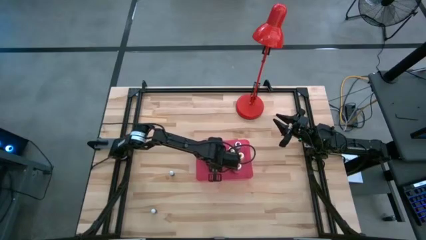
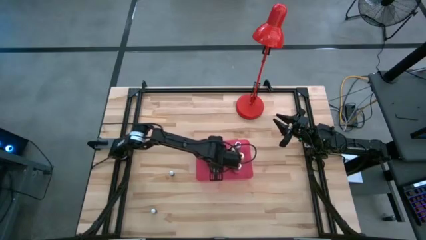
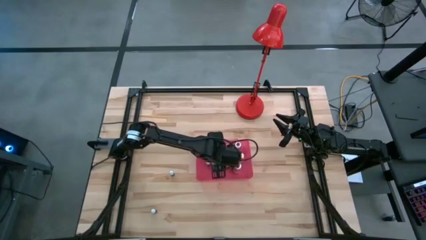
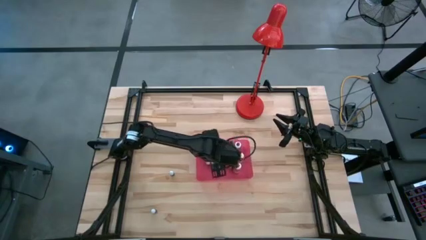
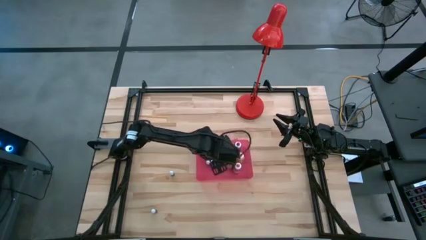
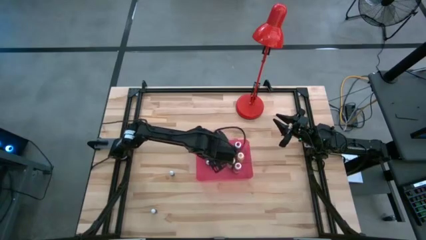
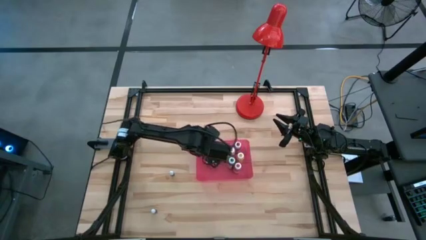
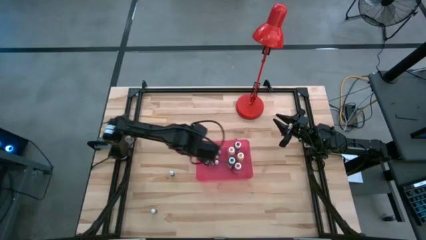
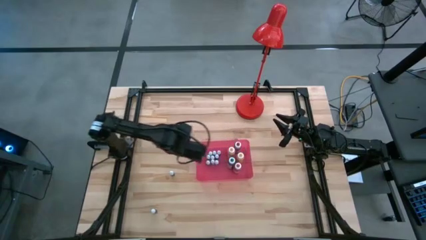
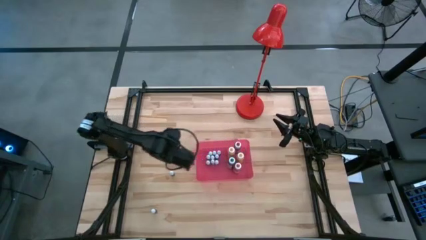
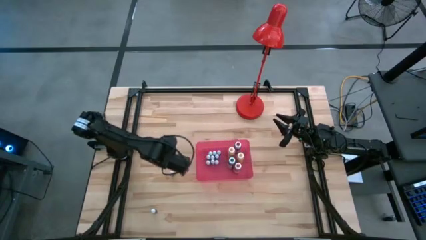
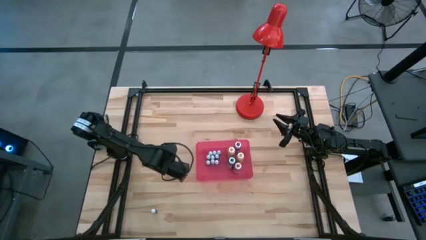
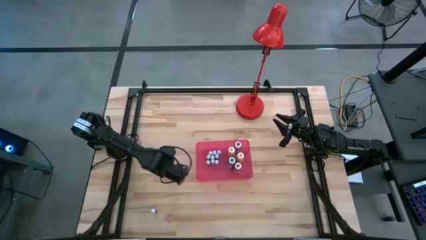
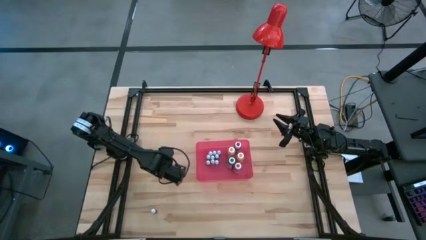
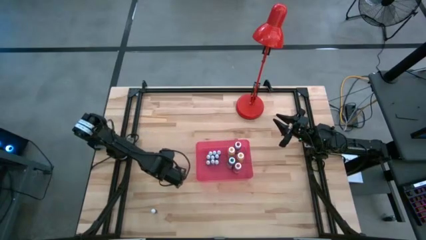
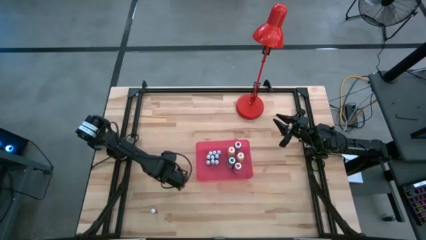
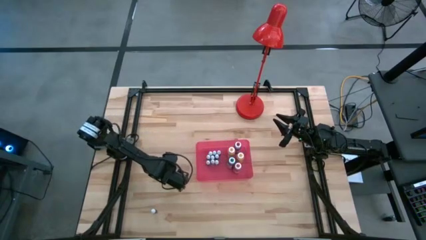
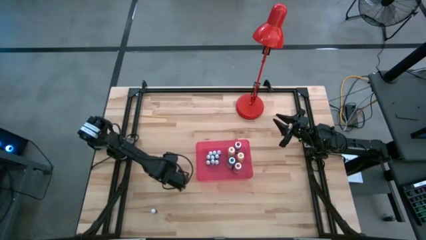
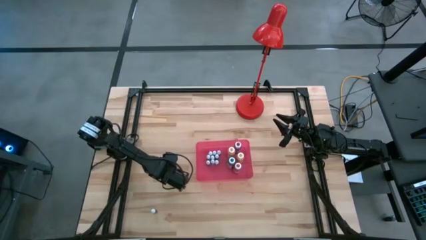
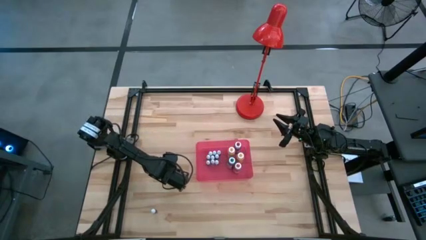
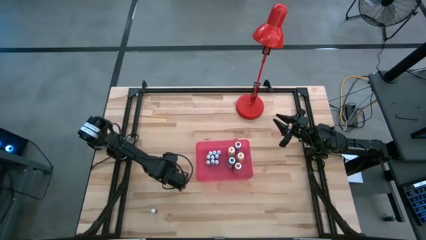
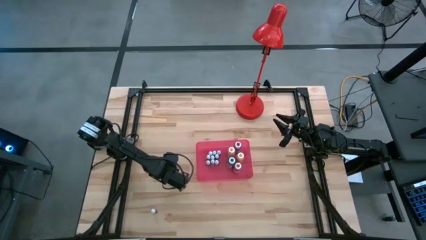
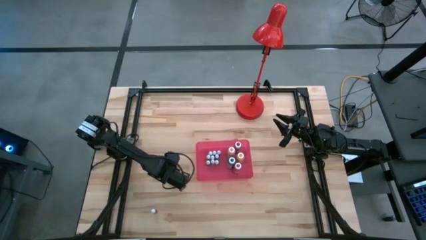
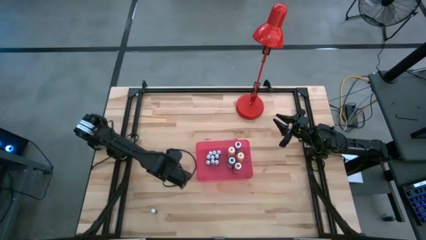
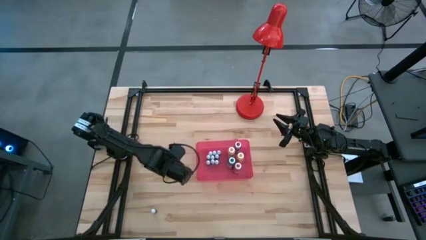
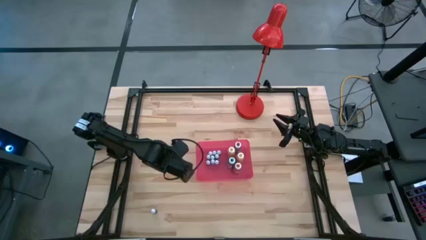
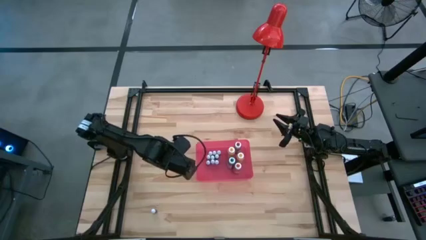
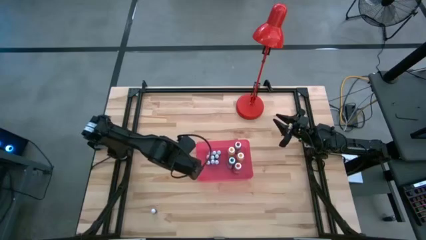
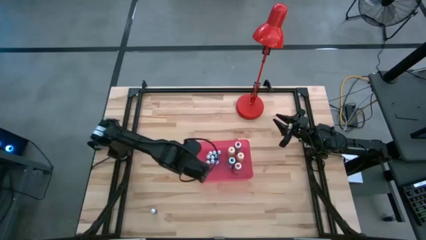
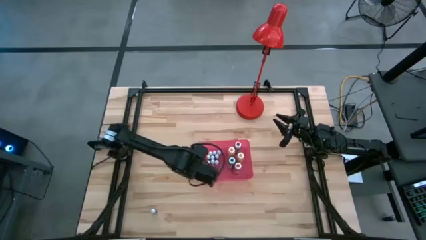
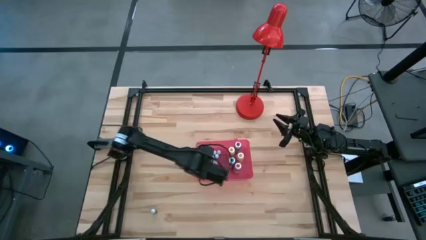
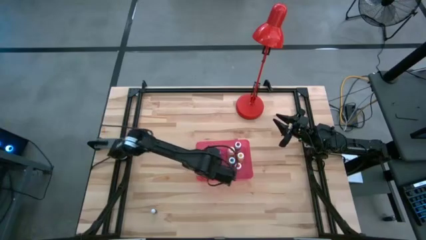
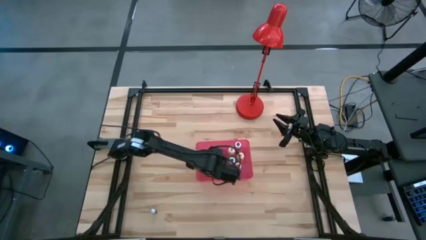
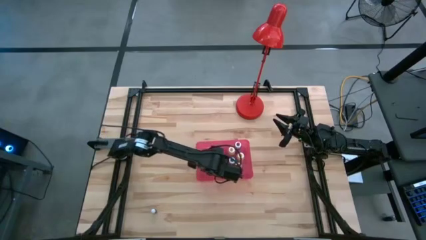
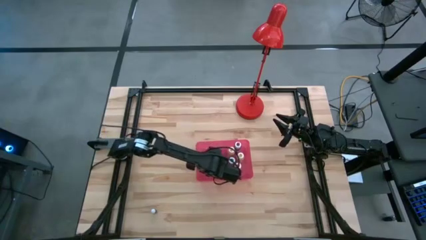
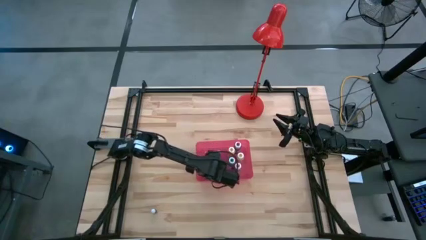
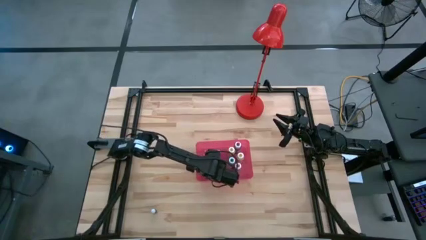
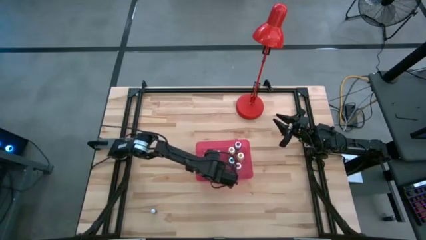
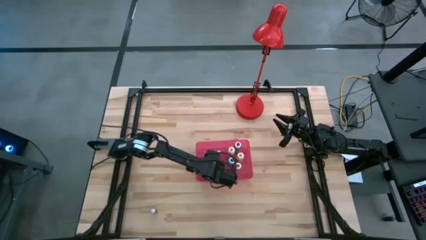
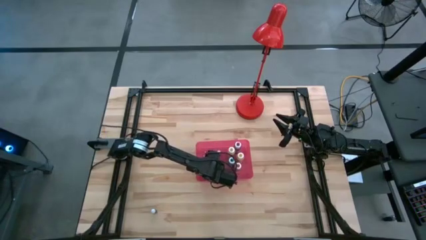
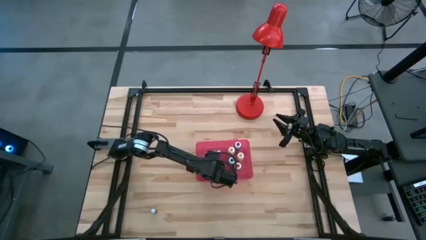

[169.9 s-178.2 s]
Task: Pick & Place food coloring
Put the small blue food coloring bottle into the red bin

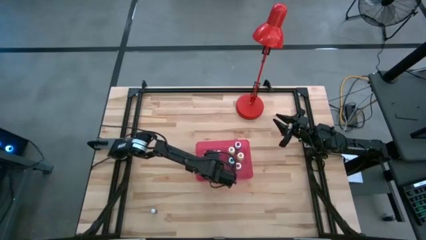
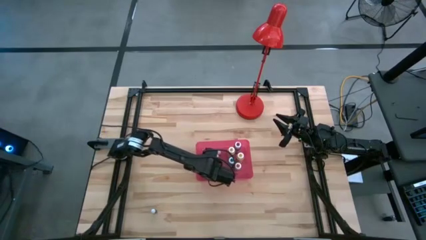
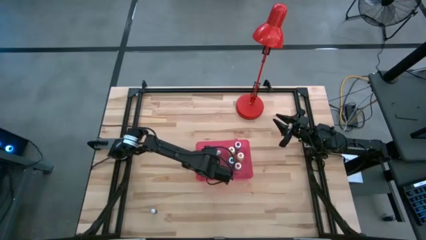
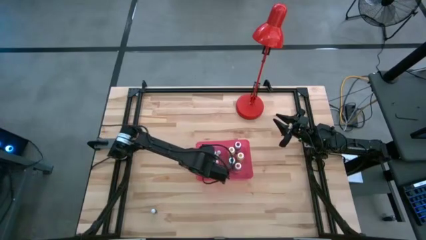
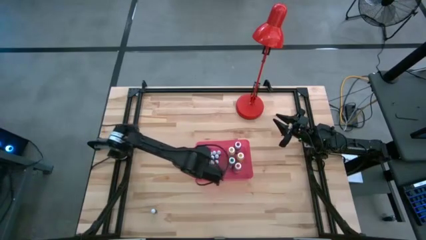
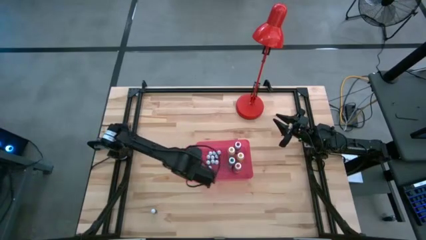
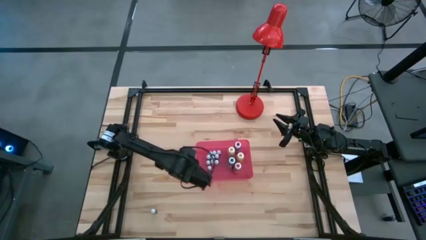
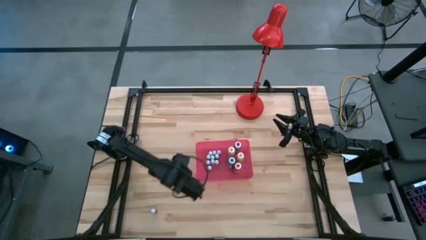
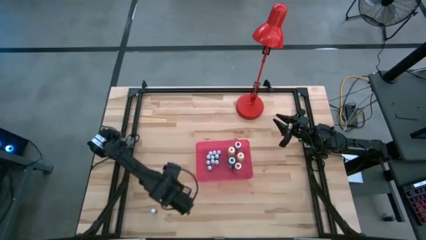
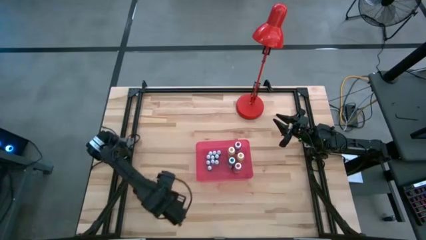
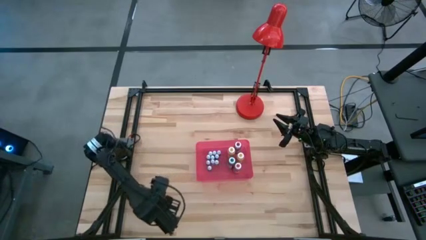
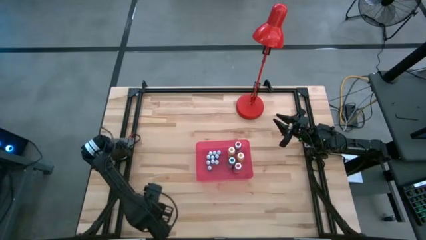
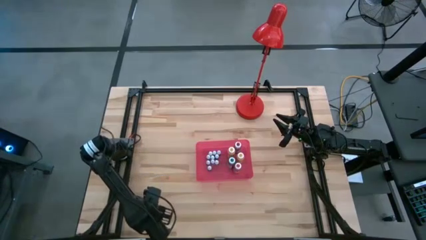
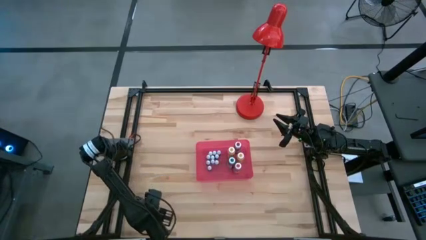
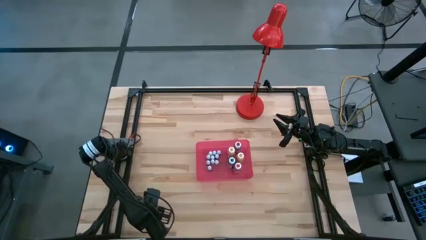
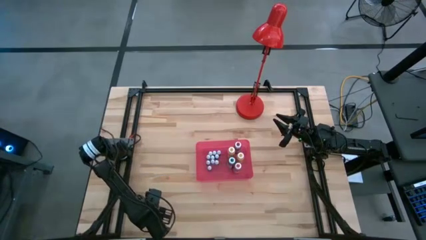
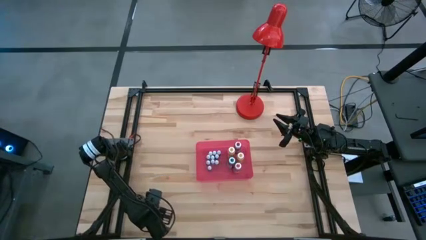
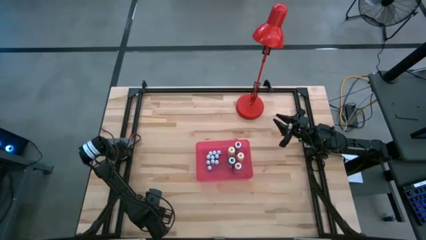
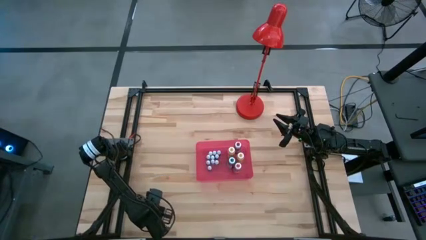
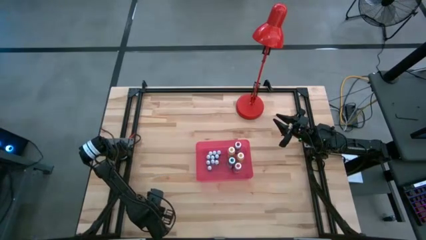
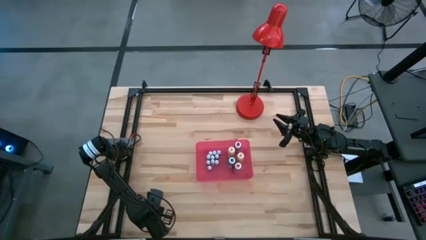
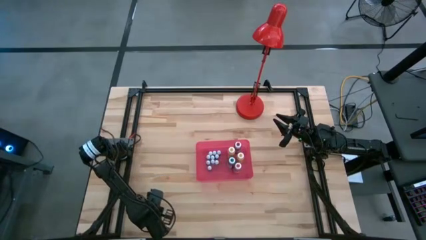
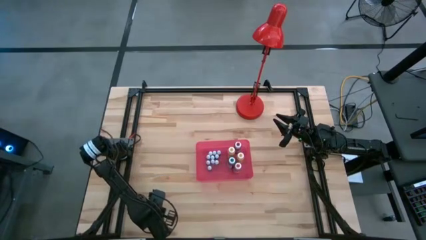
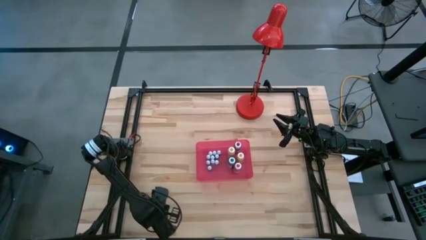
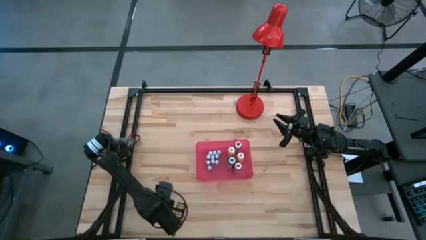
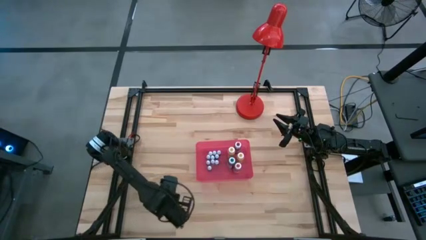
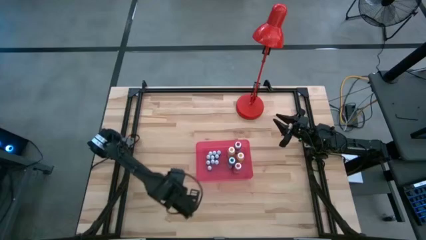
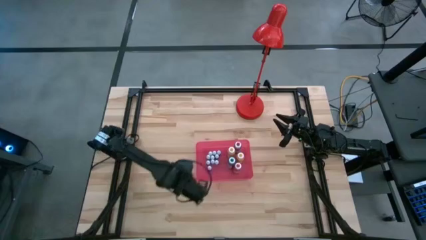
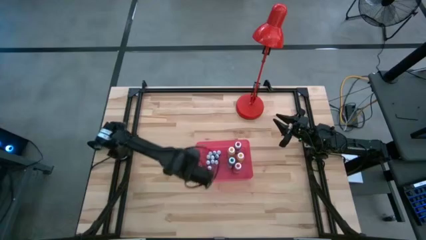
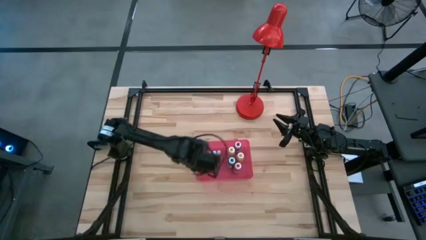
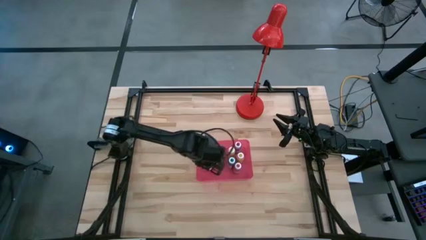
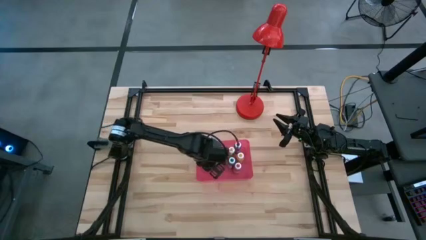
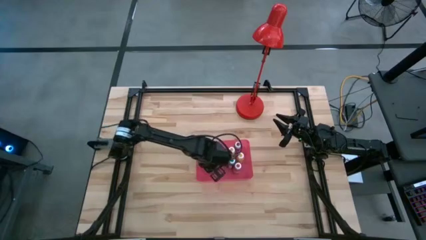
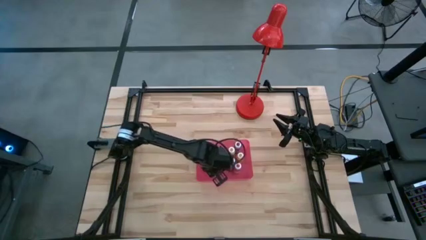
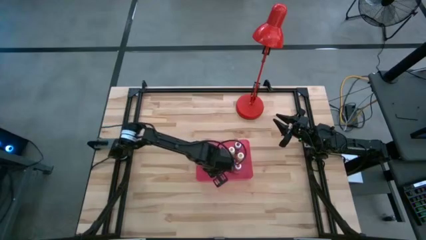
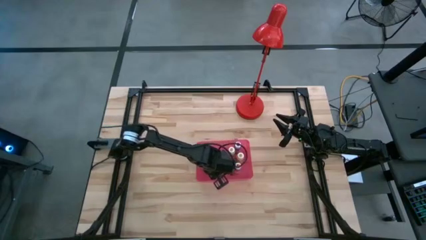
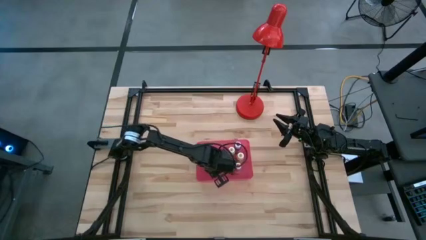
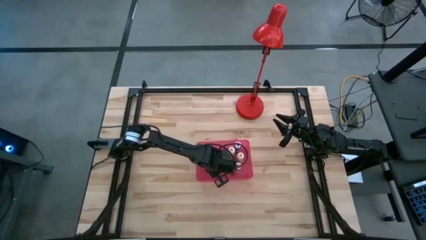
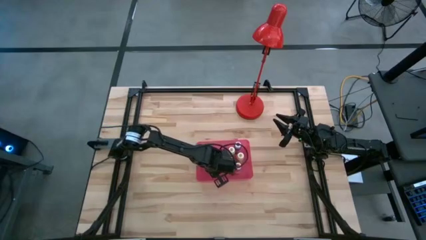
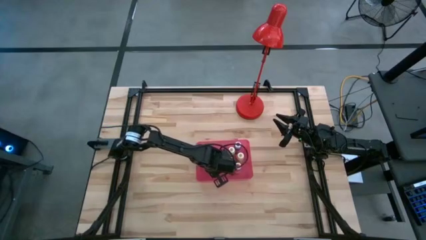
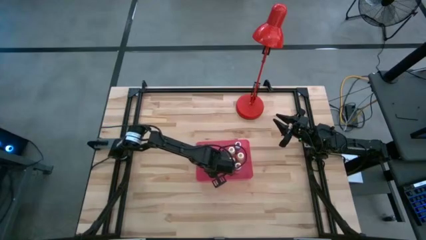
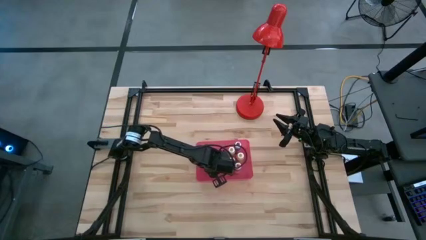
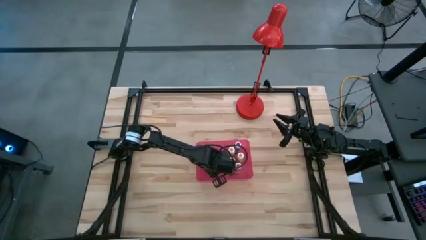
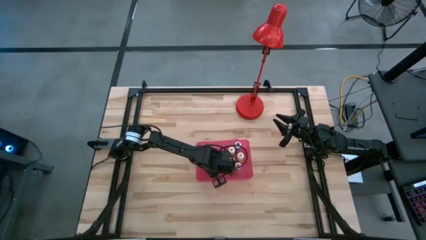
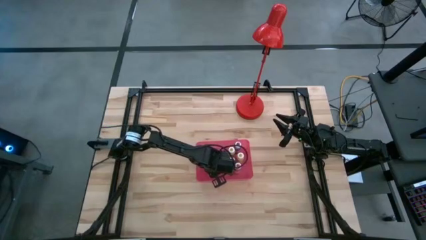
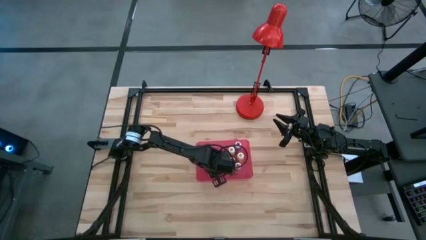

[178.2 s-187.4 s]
Put the small green food coloring bottle into the red bin
